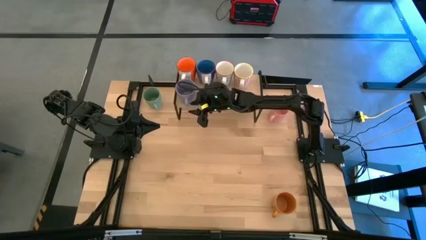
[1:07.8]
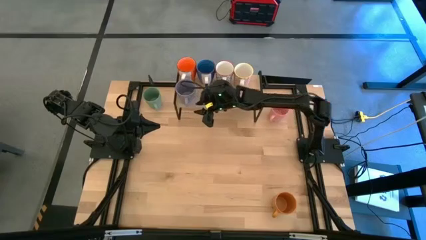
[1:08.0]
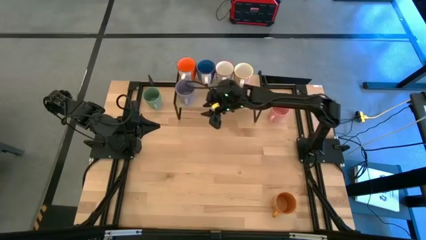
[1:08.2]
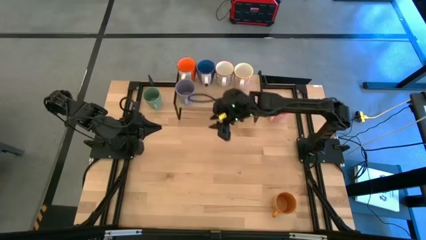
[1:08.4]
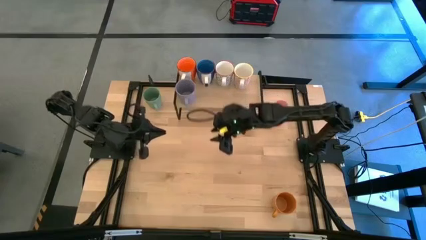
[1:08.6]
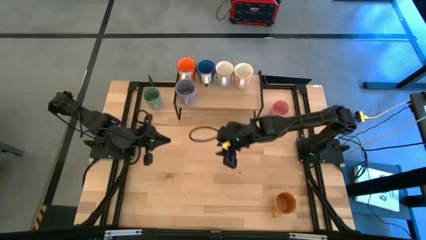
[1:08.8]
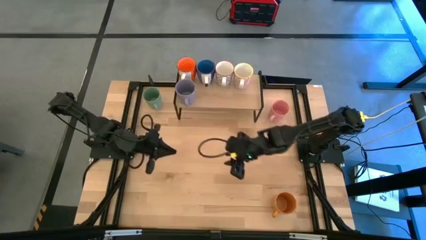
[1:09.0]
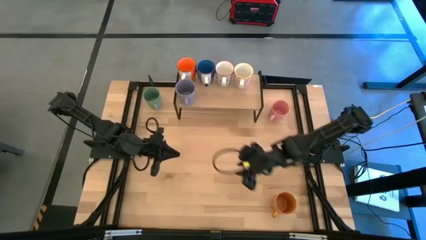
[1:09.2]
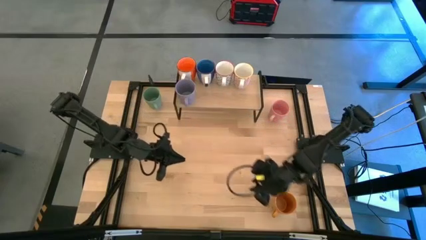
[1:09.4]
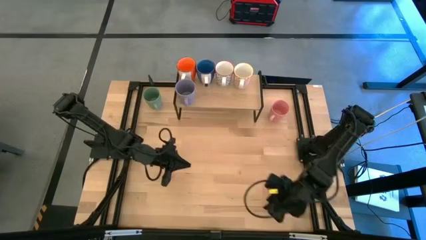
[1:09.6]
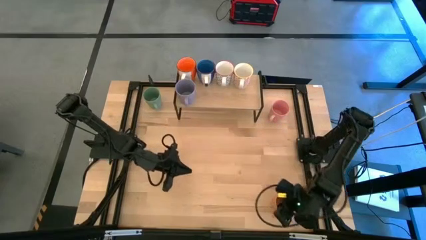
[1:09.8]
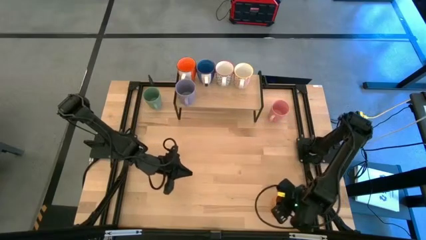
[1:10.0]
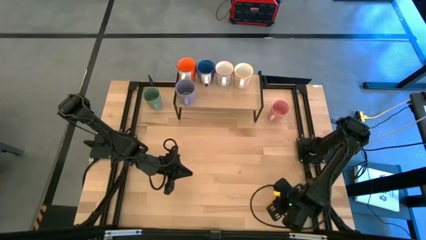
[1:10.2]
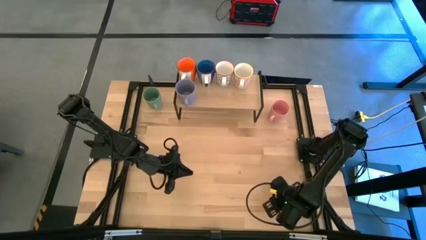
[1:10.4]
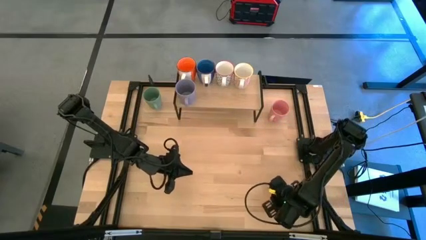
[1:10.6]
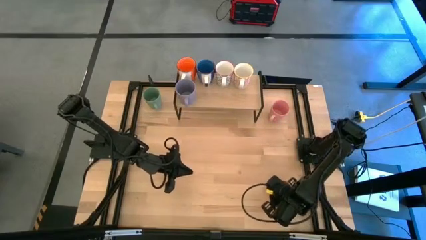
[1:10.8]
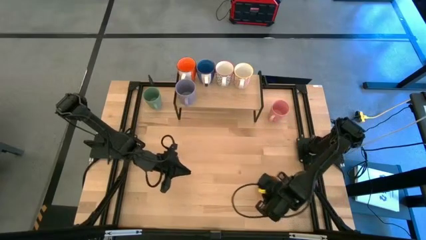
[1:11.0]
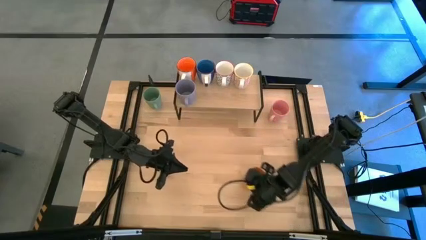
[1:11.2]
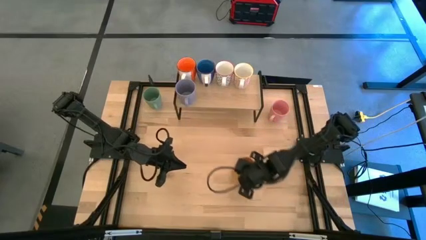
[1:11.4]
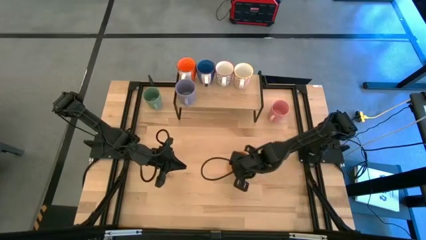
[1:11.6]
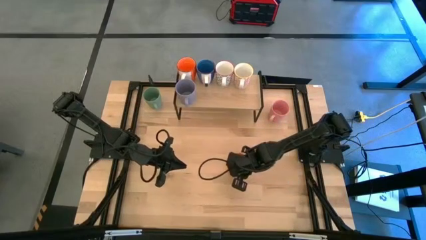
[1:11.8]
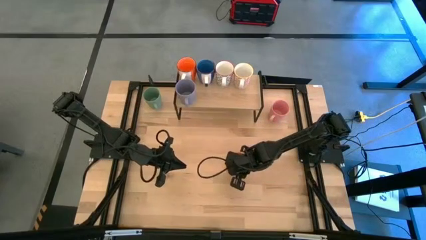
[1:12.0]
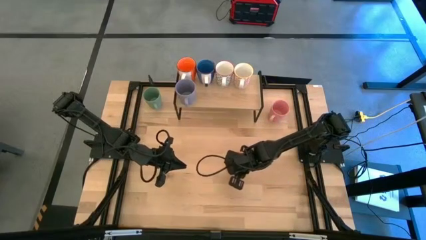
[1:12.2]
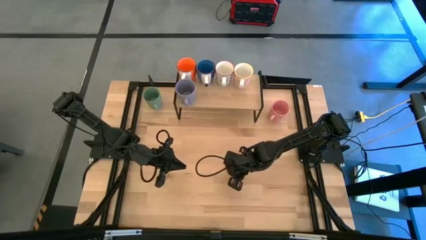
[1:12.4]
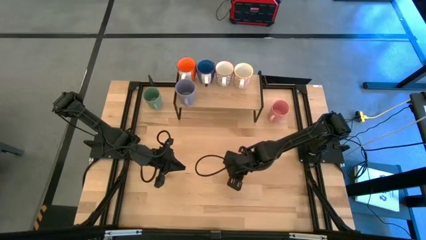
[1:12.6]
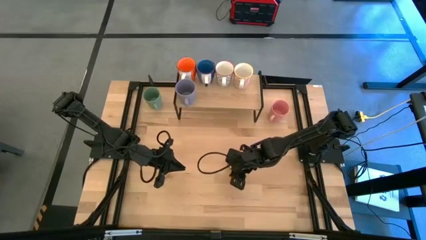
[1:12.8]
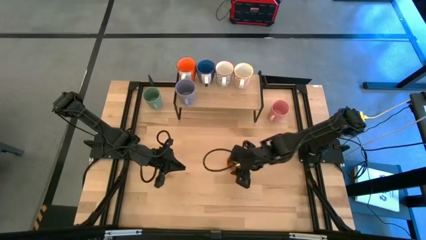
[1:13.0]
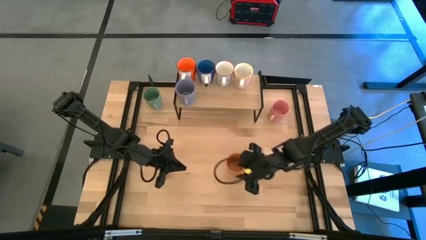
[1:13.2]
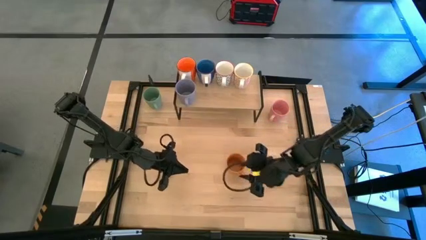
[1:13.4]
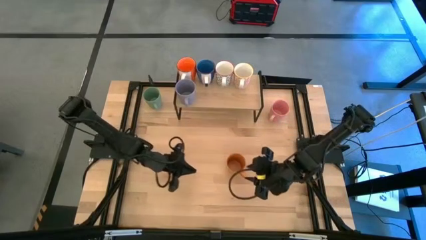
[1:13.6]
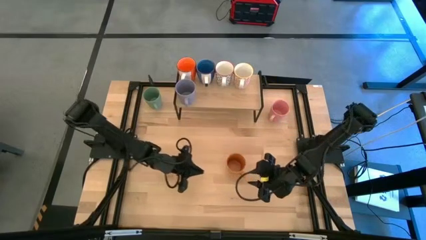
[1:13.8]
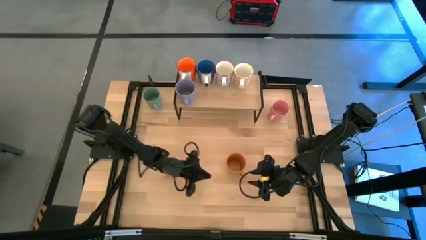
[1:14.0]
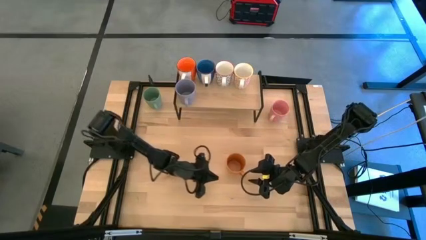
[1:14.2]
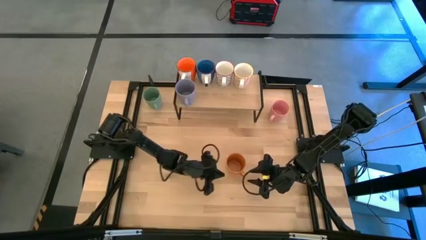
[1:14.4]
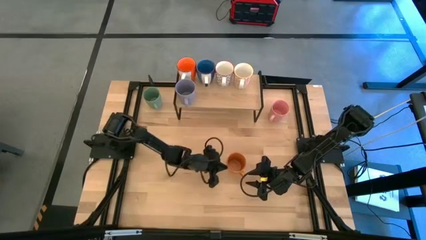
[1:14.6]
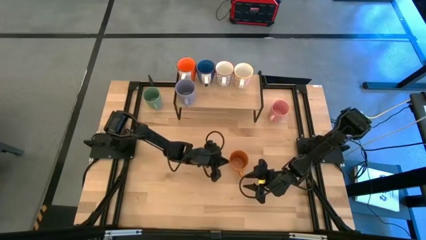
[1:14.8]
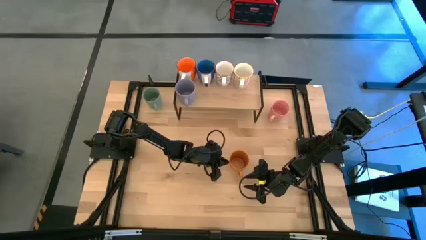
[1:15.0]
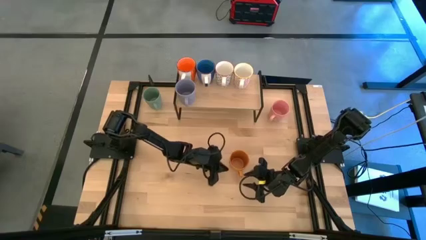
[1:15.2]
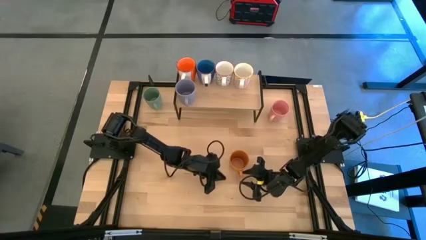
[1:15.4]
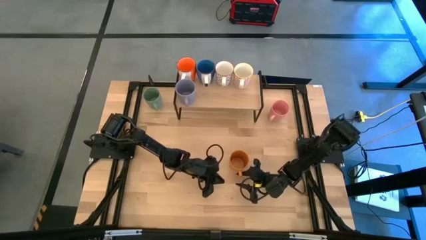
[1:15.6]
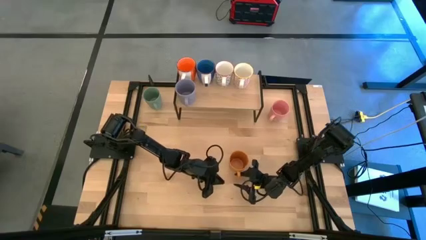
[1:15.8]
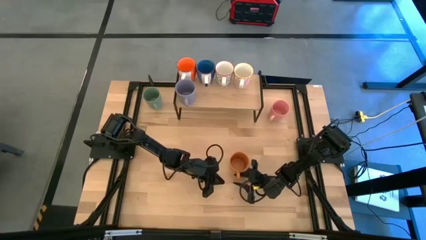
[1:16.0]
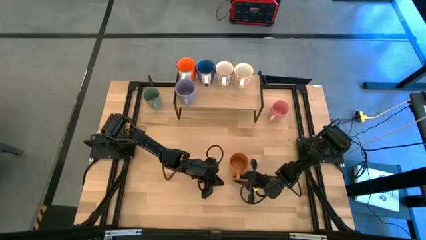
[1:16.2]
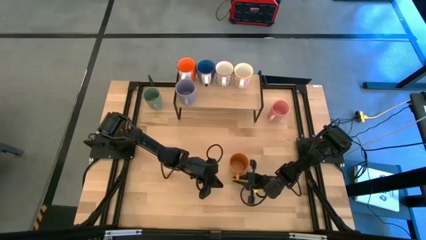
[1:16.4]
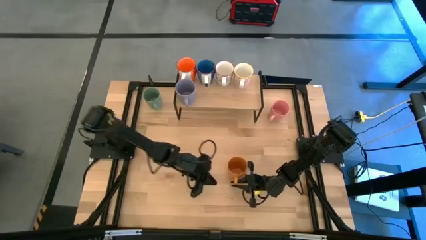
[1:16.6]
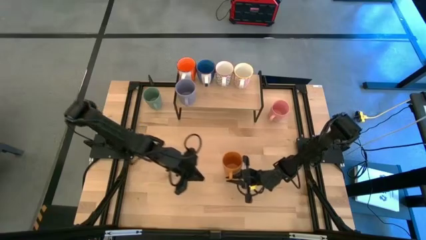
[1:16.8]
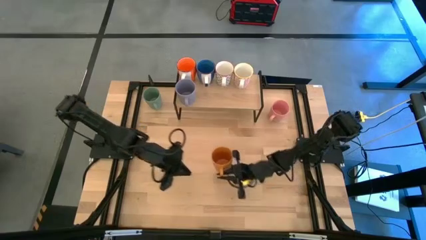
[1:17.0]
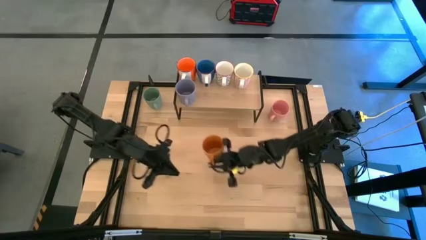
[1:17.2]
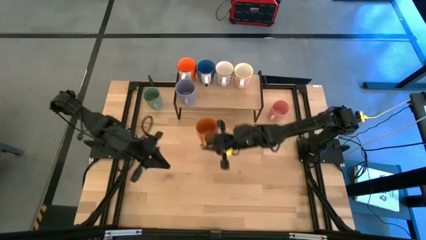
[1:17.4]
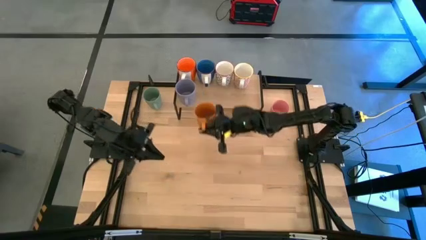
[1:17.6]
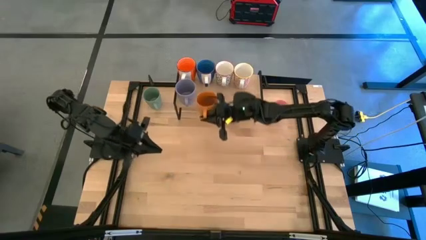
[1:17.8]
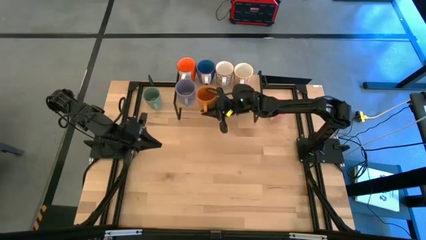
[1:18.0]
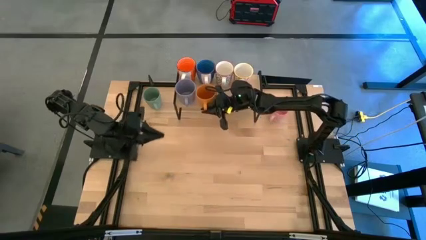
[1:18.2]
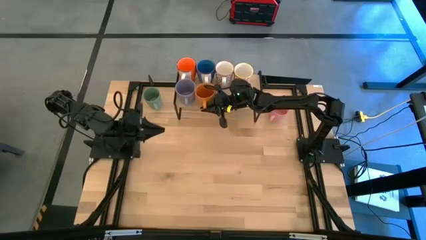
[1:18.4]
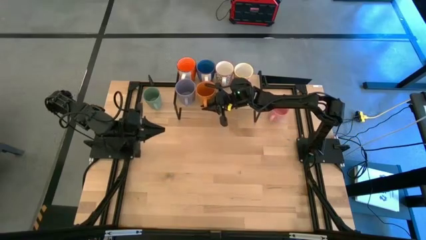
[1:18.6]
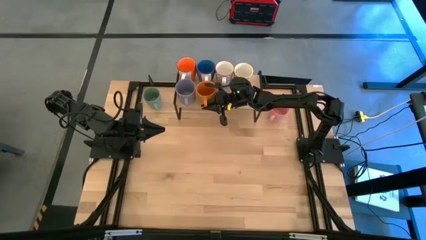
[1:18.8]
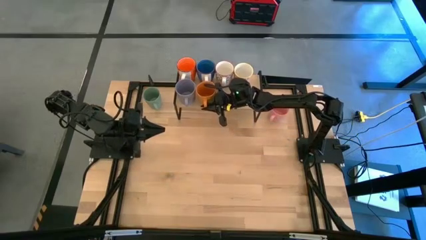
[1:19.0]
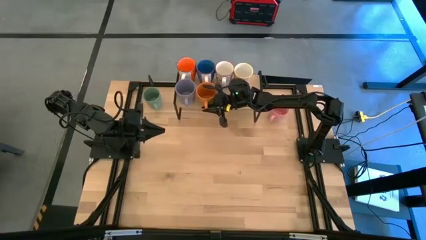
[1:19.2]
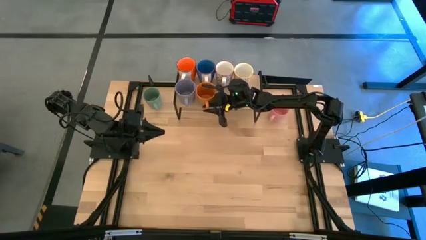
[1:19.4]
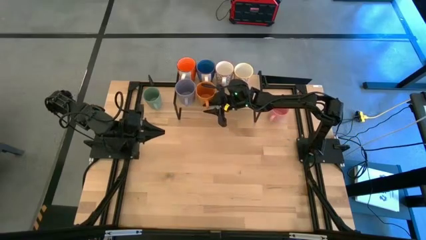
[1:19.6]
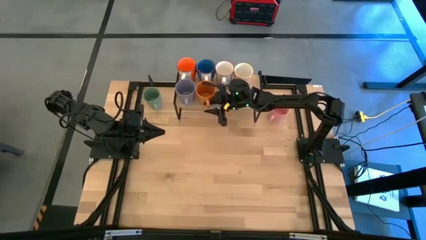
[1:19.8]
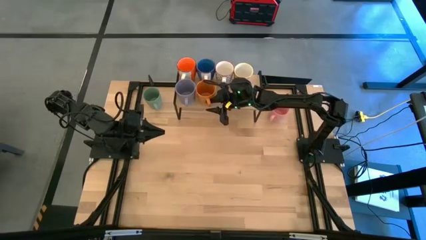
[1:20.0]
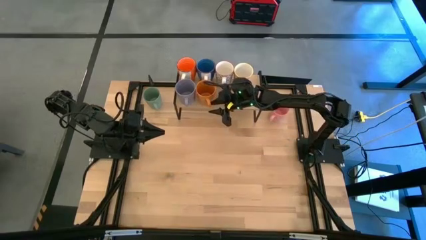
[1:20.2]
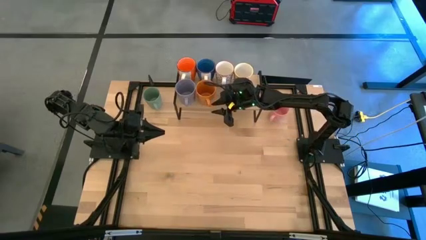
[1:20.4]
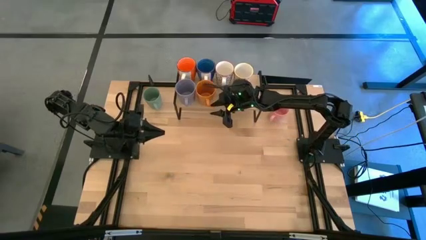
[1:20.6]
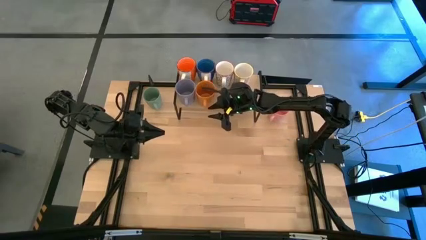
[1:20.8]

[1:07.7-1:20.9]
Task: Place coffee mugs
Put the light orange mug on the shelf

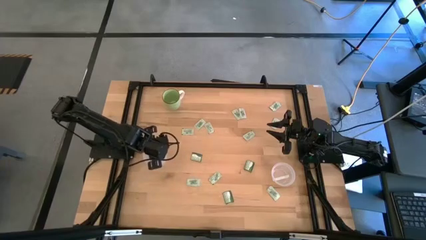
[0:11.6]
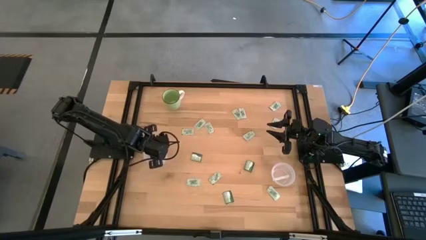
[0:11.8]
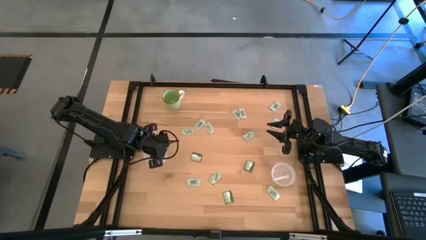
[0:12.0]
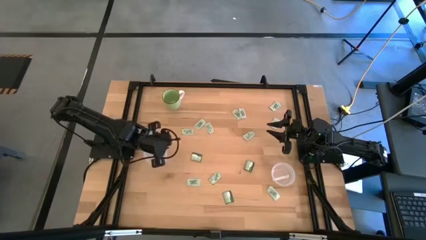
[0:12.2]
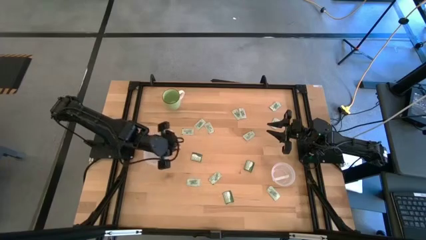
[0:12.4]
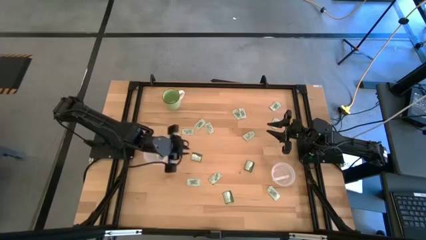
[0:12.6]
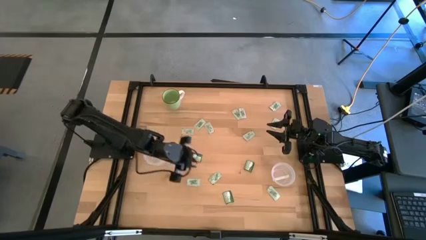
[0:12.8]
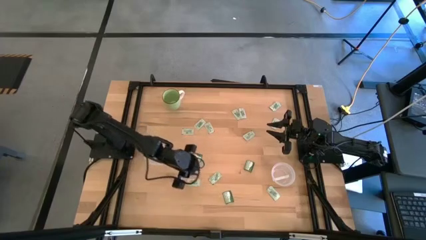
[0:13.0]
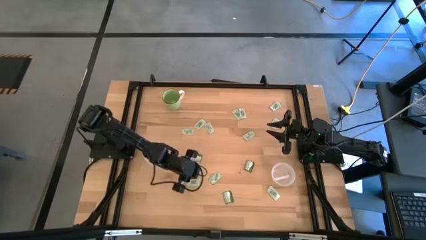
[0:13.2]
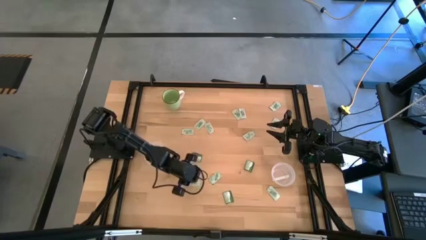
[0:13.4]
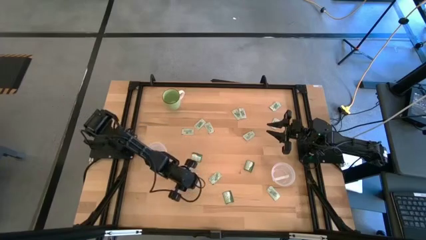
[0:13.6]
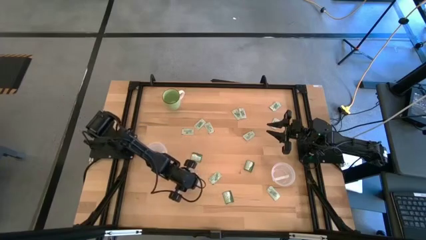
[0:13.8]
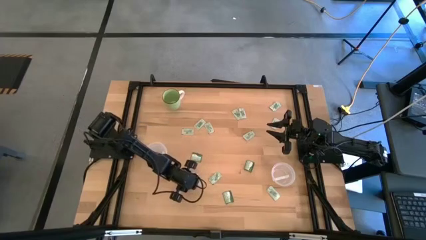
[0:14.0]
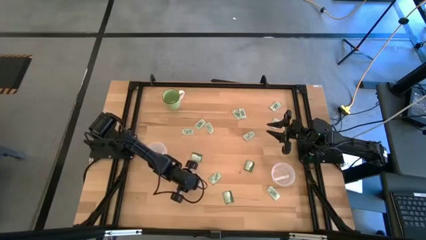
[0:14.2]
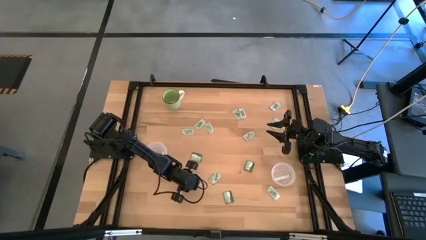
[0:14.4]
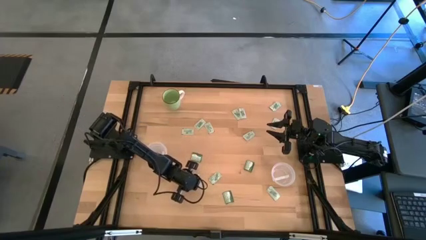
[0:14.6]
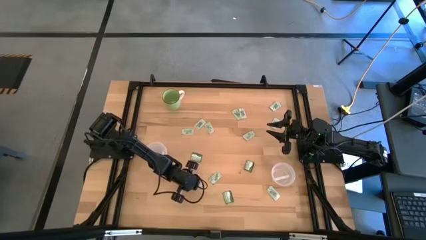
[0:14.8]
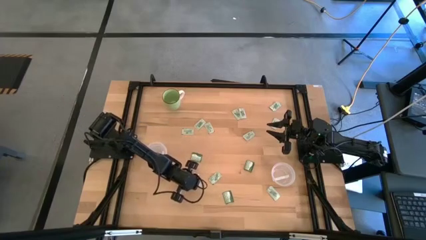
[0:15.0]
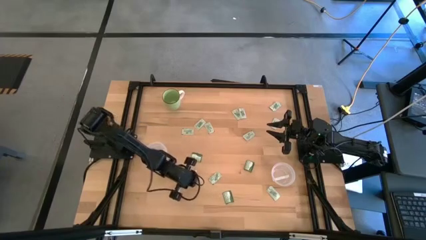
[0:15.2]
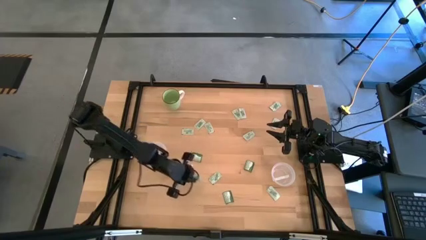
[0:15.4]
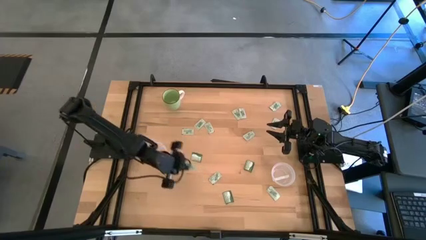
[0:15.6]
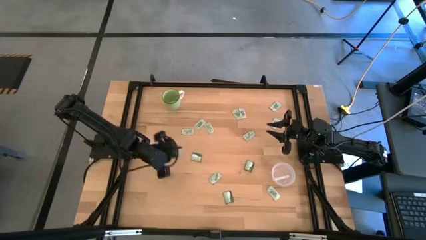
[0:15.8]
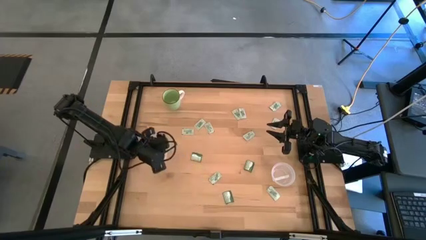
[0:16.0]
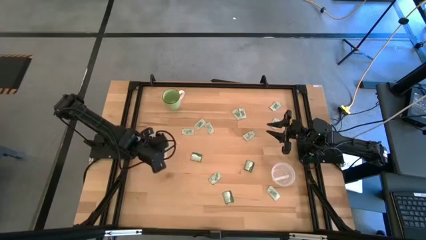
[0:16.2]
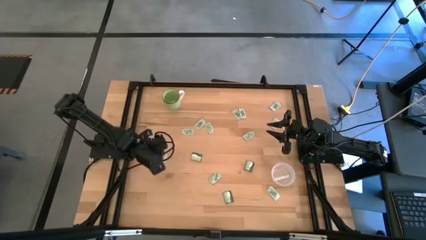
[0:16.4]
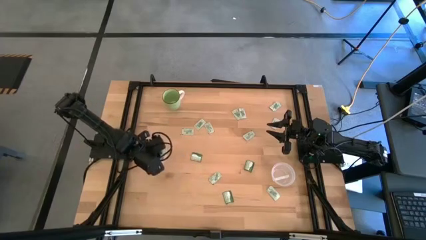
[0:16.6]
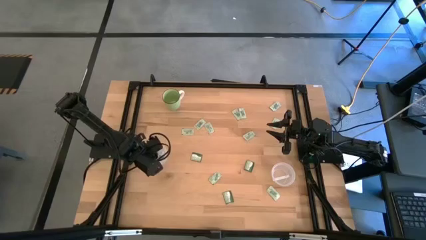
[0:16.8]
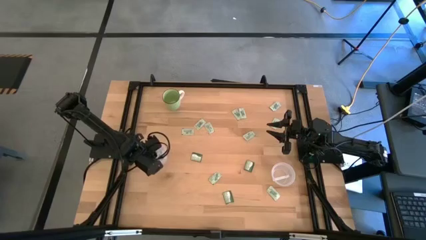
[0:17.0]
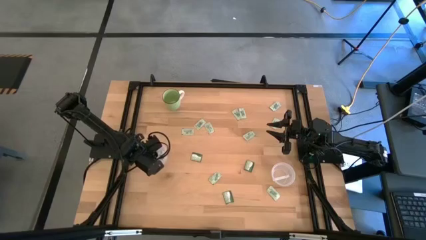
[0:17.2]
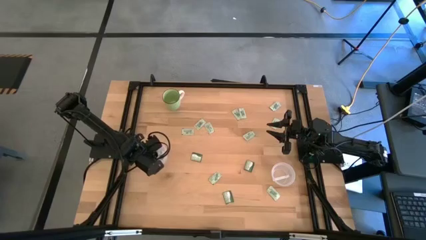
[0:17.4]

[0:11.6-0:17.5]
Task: Pick and place items into bin
Put the stevia packet into the left transparent bin
